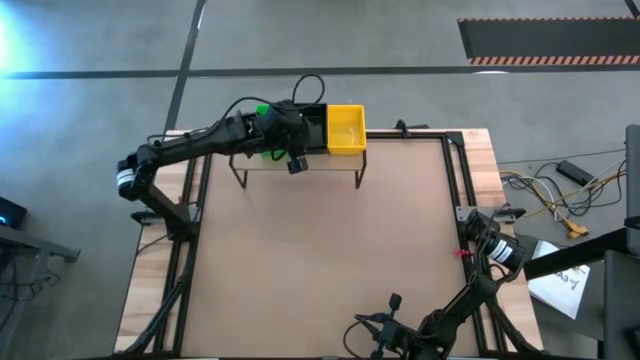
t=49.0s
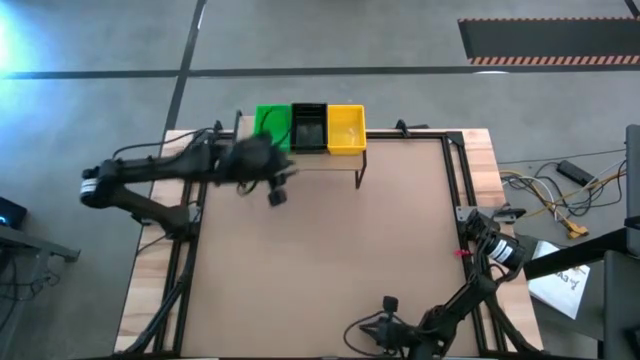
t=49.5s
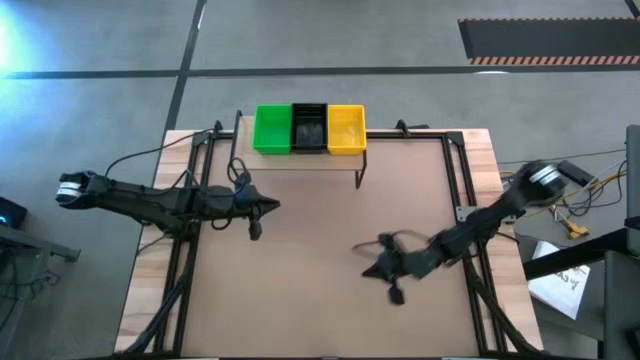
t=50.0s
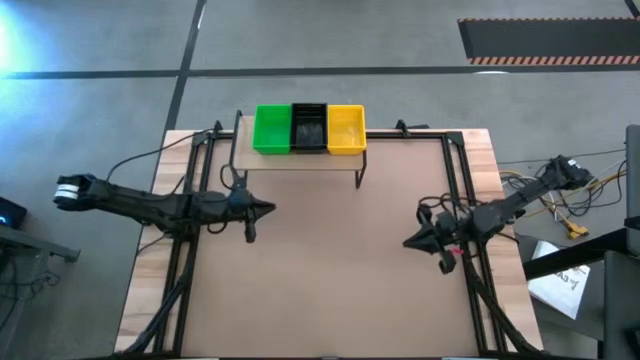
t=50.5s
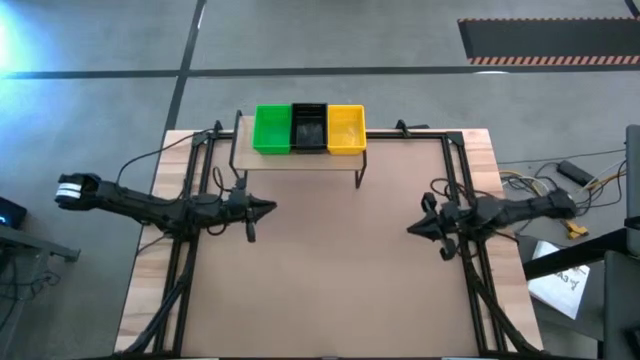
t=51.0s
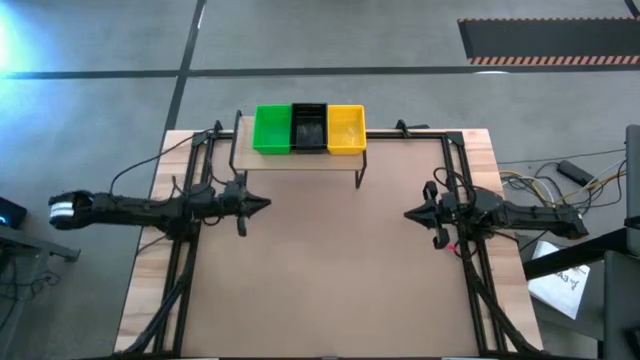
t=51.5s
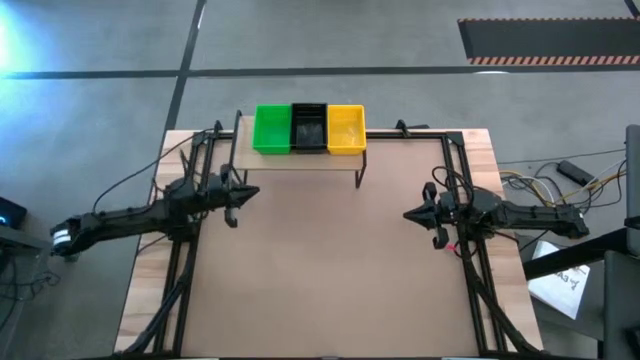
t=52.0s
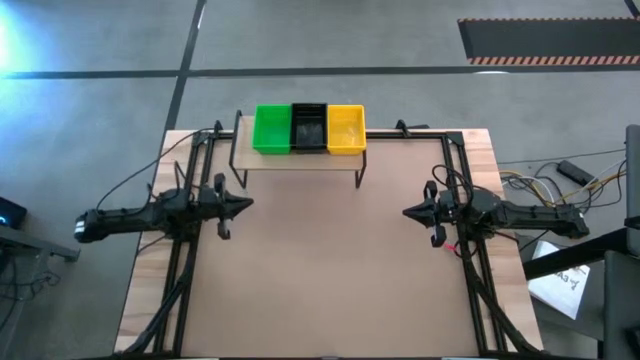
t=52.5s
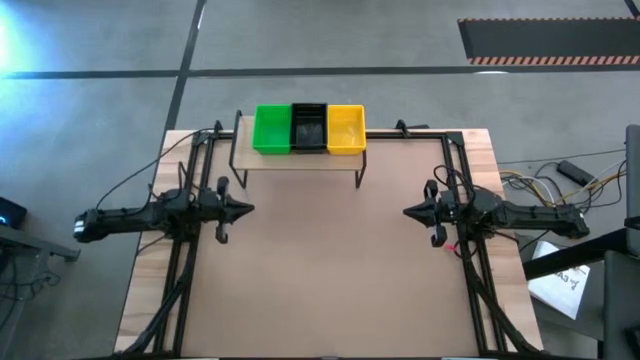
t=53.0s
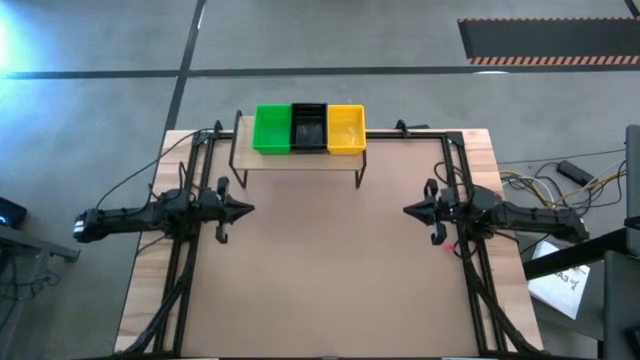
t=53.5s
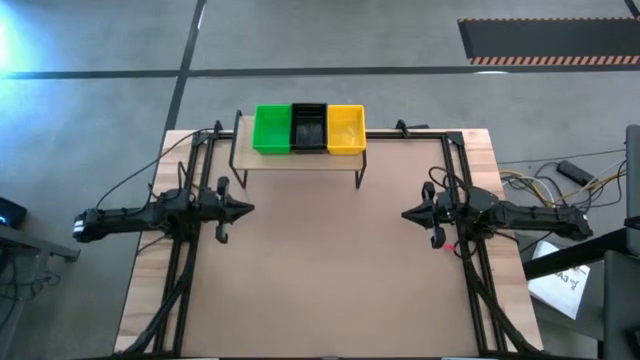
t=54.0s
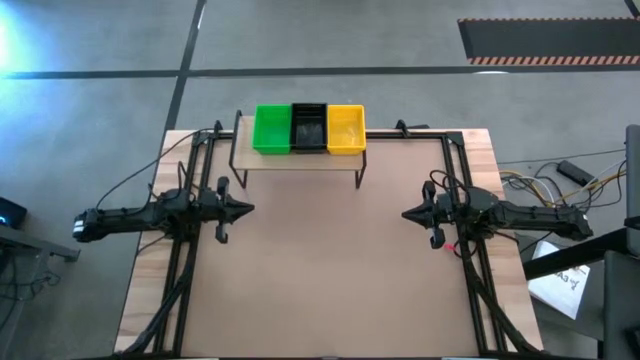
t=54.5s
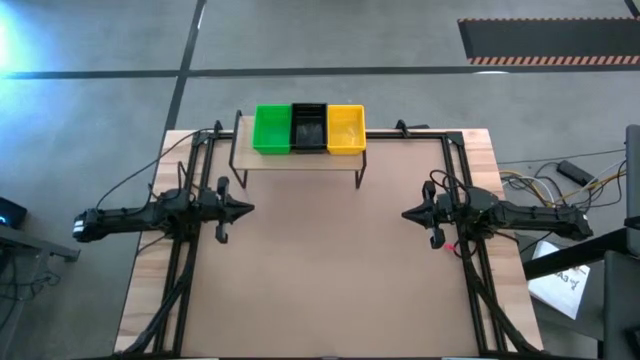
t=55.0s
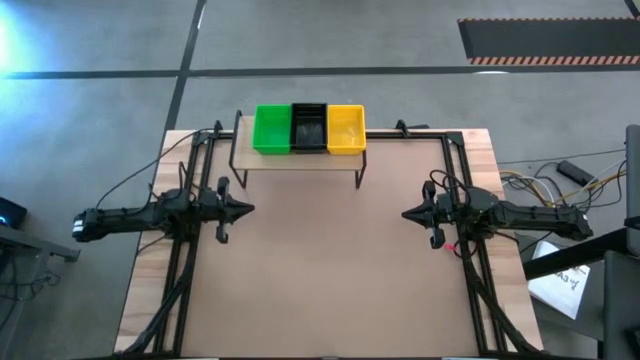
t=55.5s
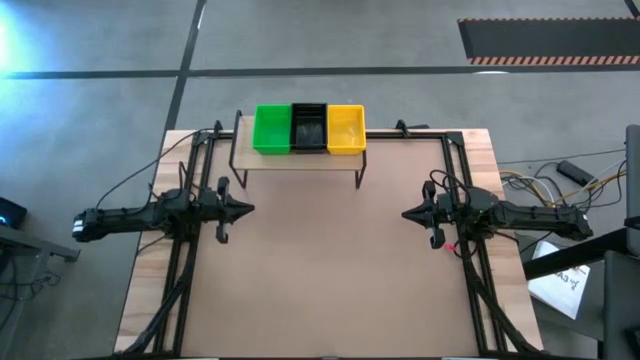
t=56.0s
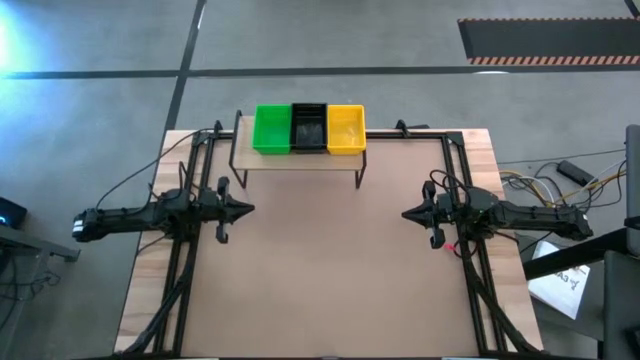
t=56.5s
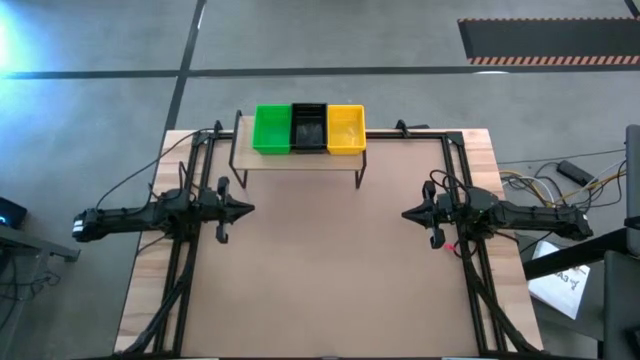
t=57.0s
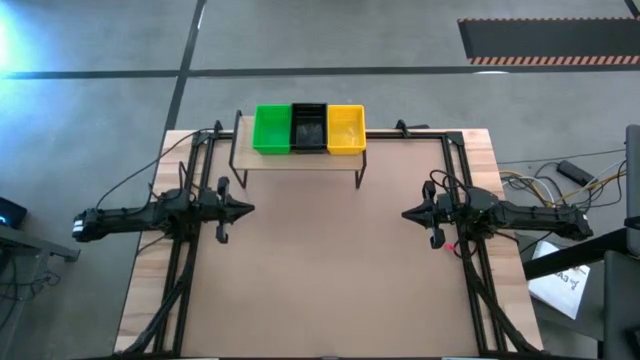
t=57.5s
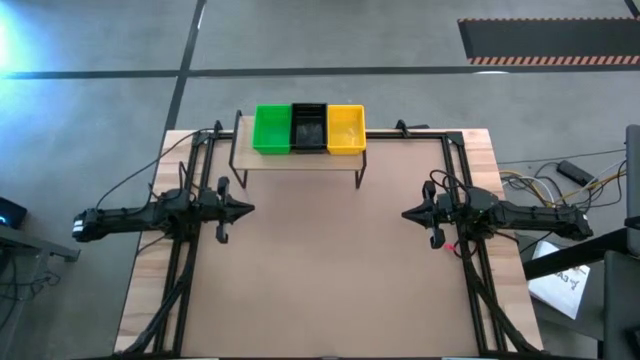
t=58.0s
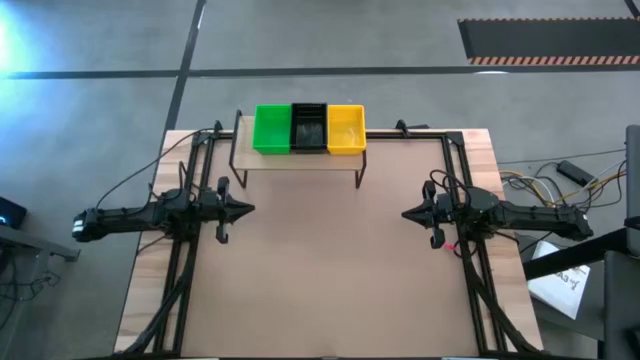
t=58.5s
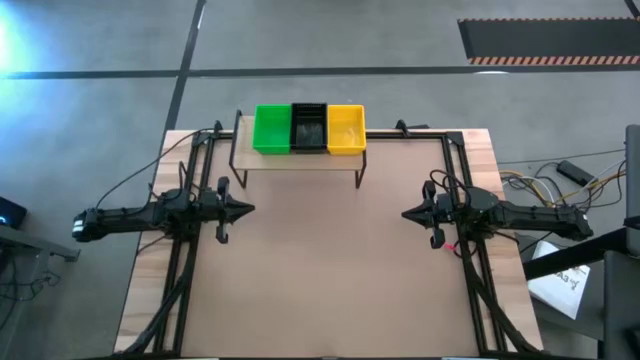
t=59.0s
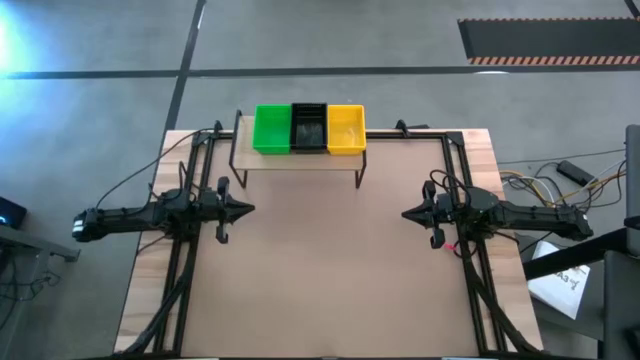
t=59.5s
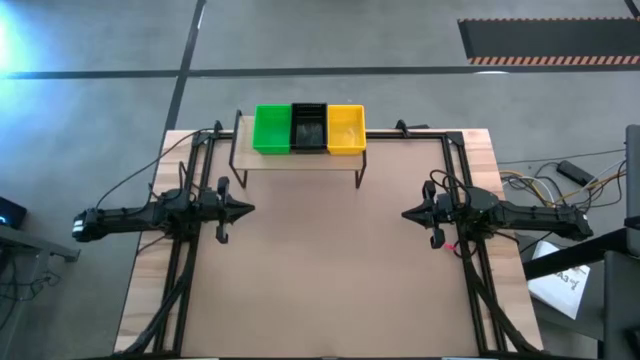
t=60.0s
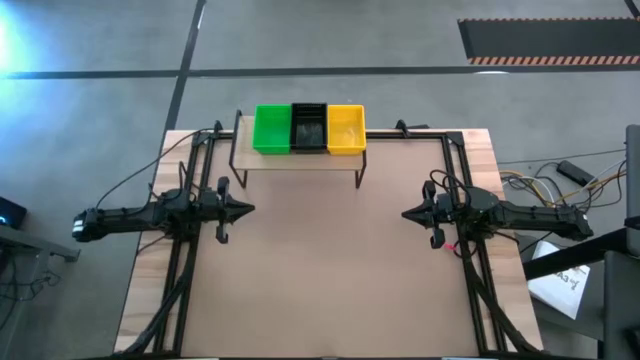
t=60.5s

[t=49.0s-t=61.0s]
Task: Stack baskets on shelf by color
Return to Home Position

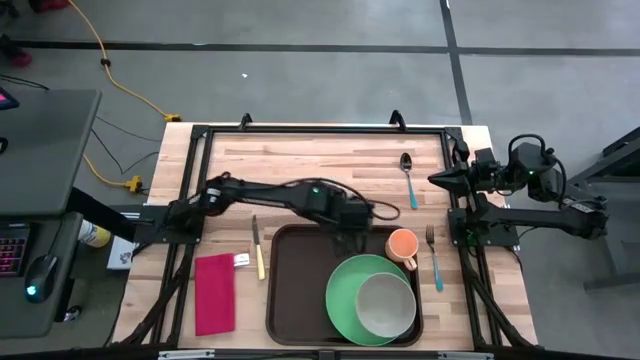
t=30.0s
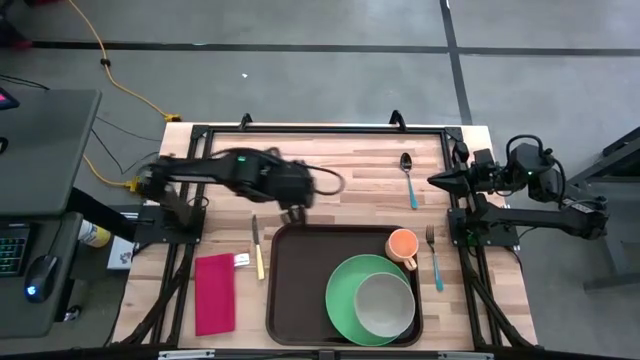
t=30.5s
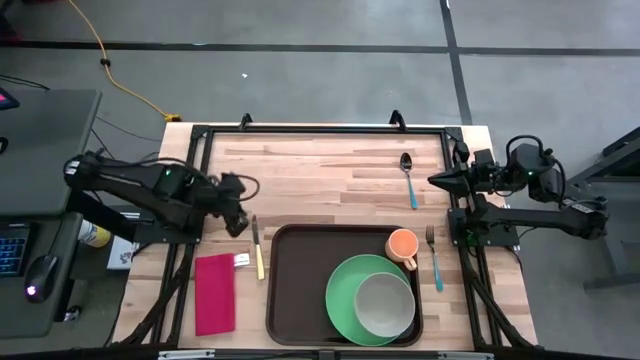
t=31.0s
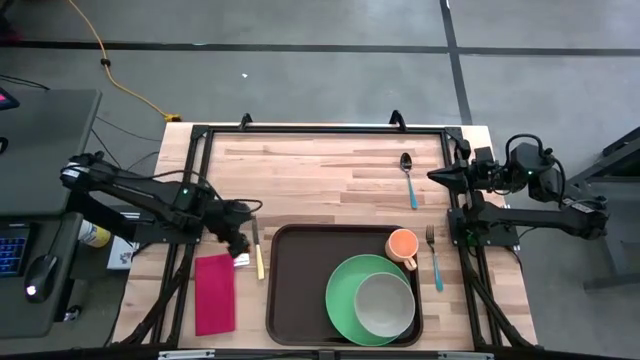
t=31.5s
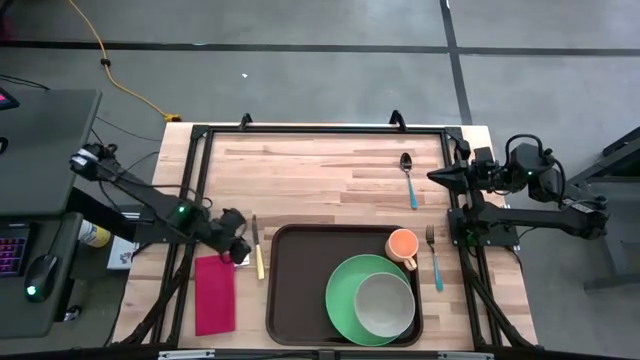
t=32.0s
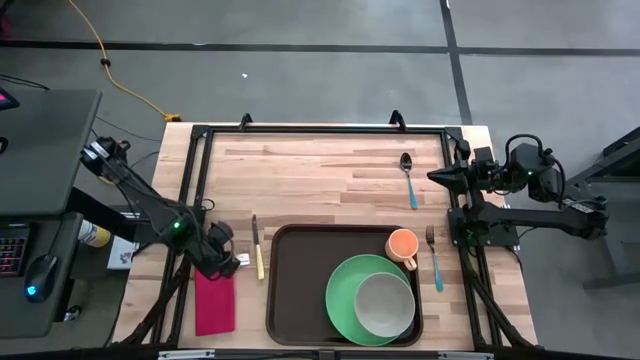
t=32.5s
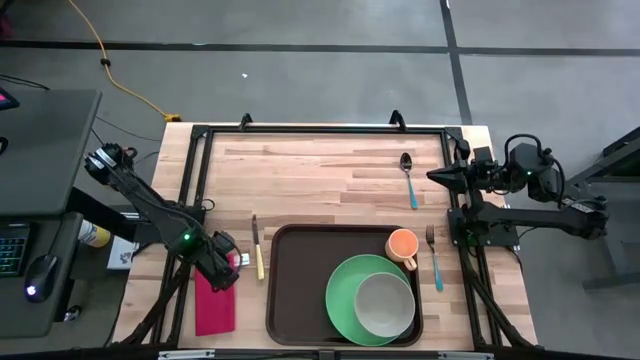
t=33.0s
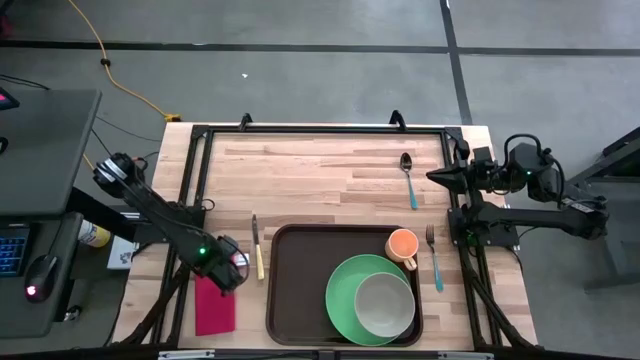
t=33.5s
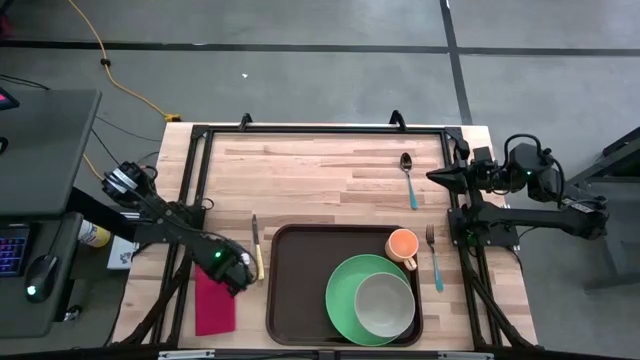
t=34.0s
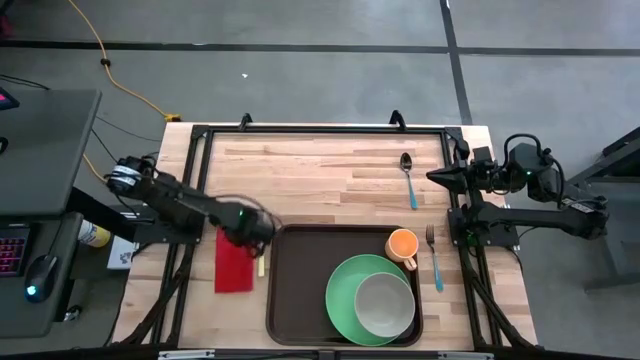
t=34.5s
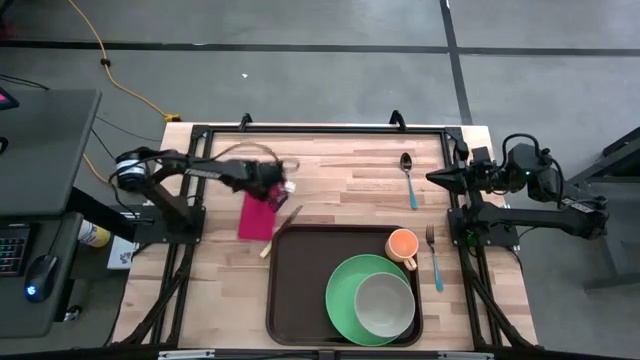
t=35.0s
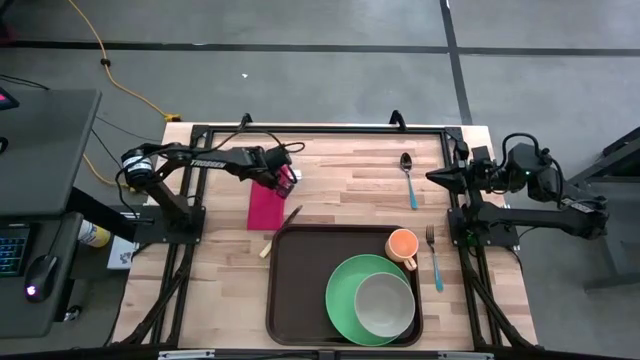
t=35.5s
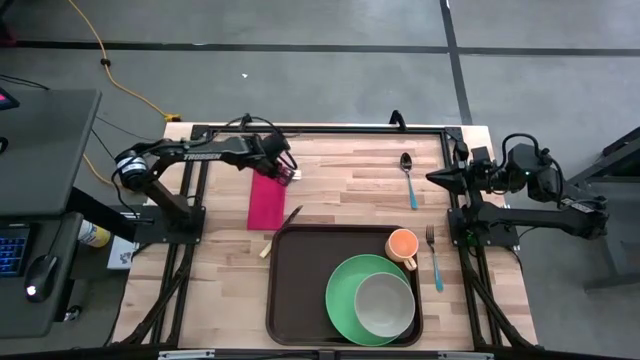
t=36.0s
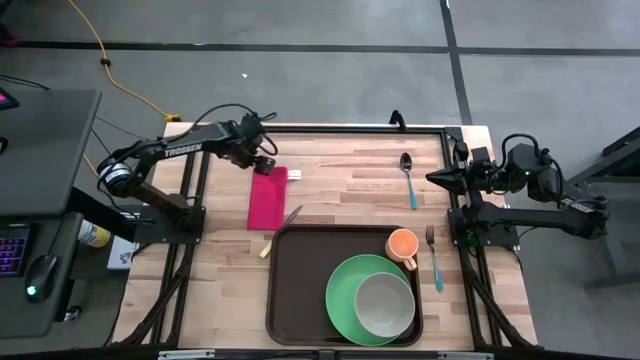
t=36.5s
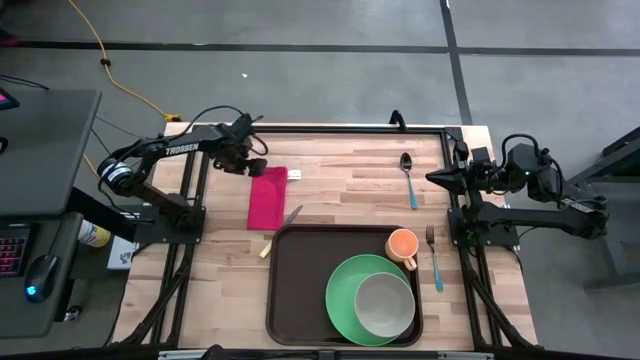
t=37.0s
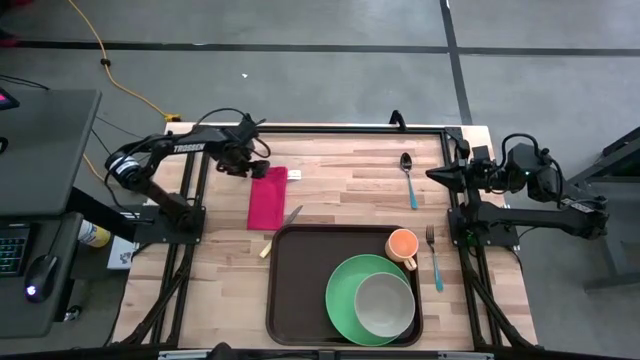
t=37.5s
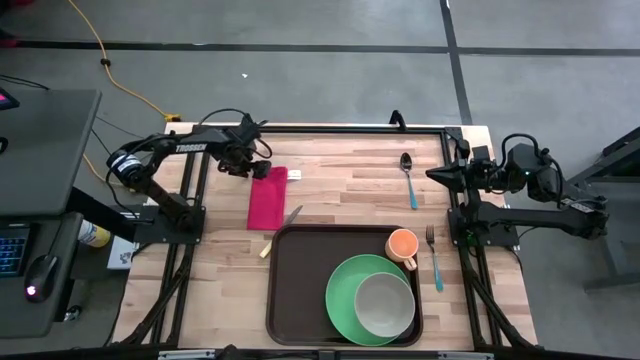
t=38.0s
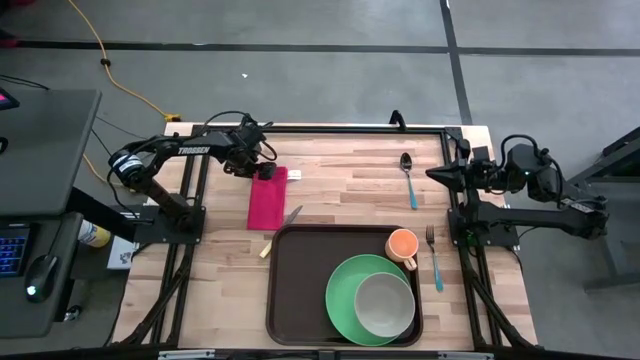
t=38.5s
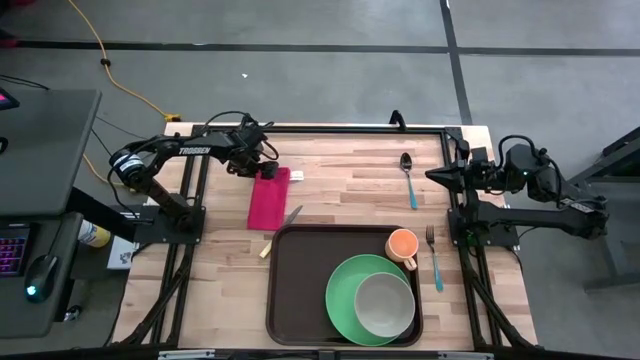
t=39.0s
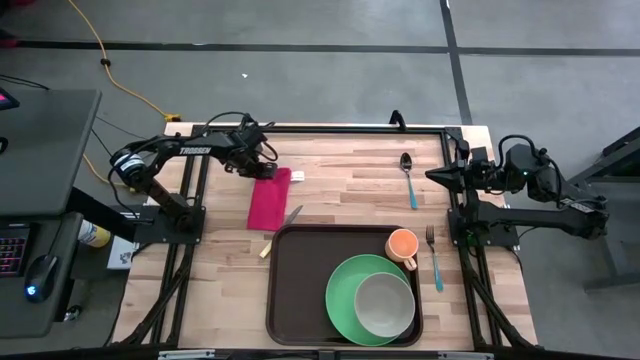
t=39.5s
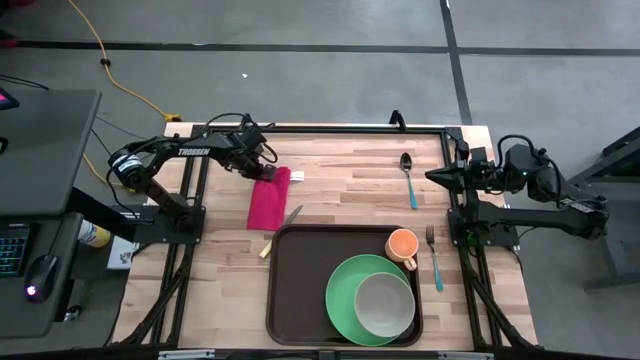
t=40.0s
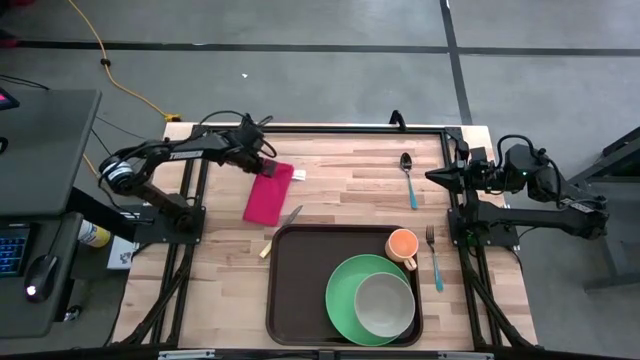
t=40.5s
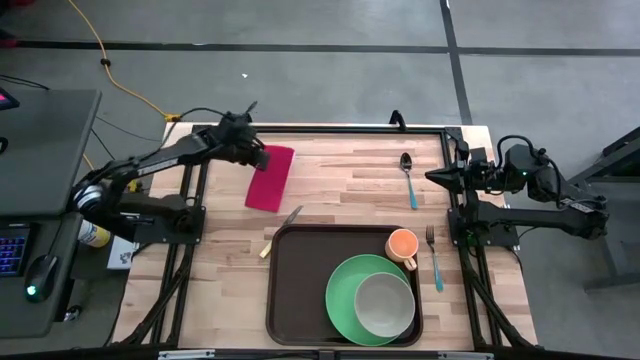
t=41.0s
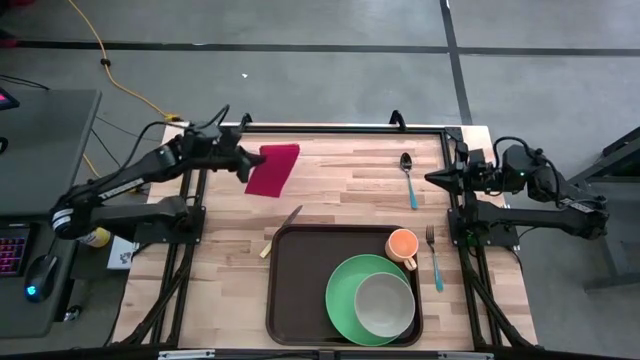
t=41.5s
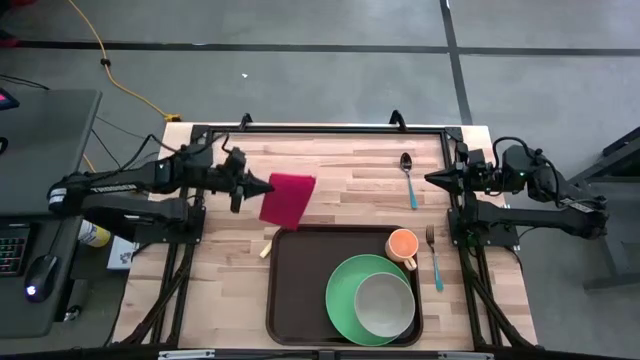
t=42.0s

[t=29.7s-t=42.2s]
Task: Set up tray
Put the red napkin on the black serving tray to the left side of the green plate
